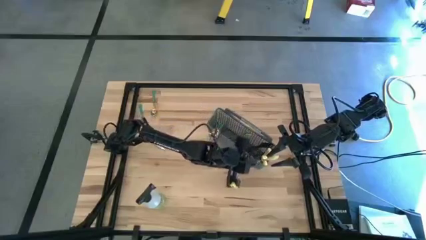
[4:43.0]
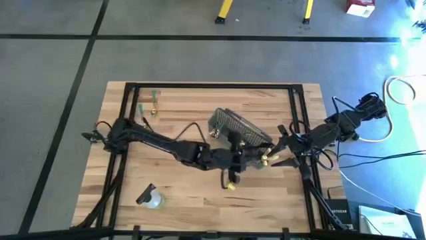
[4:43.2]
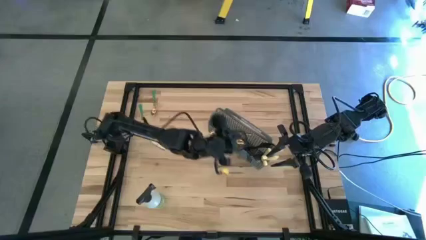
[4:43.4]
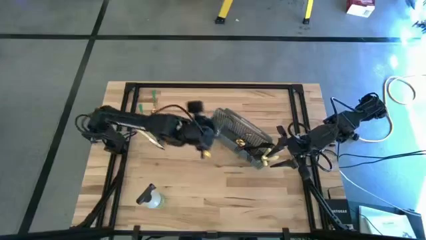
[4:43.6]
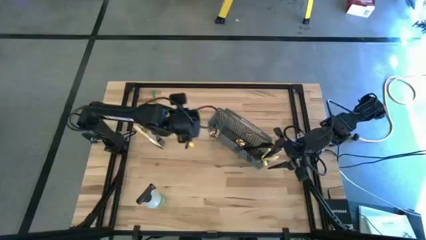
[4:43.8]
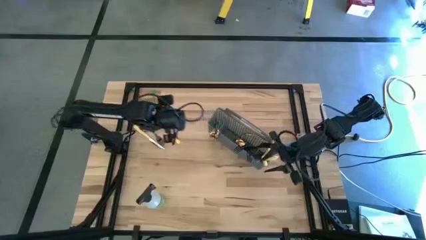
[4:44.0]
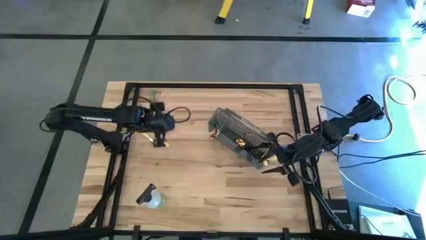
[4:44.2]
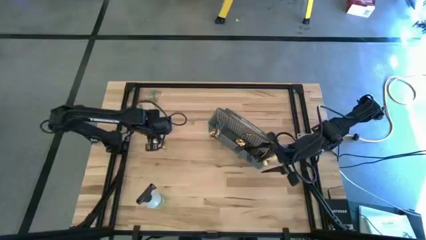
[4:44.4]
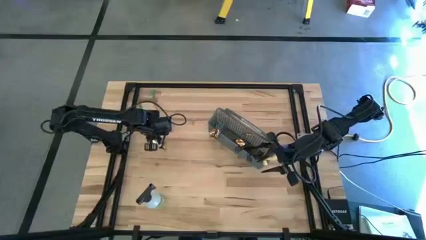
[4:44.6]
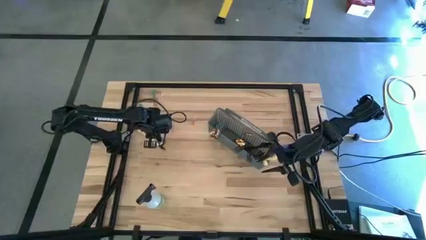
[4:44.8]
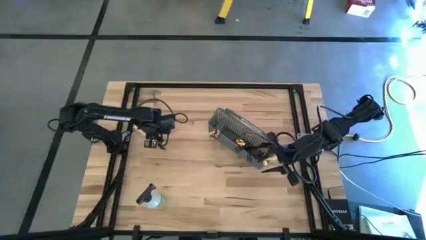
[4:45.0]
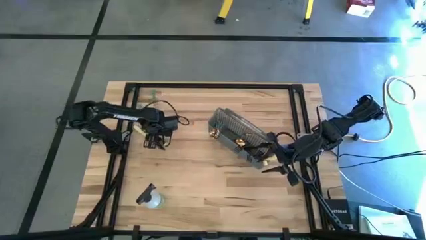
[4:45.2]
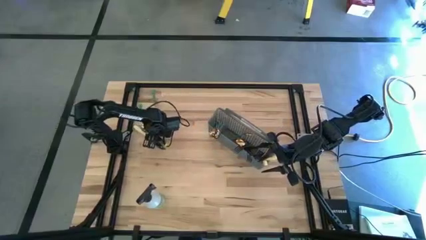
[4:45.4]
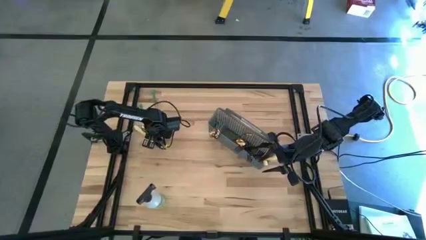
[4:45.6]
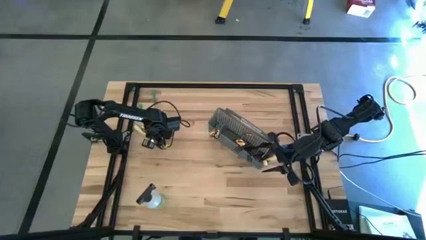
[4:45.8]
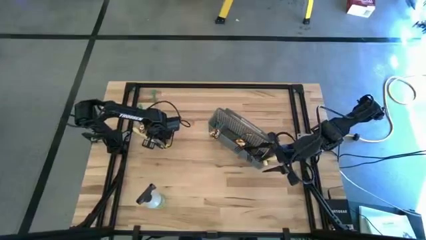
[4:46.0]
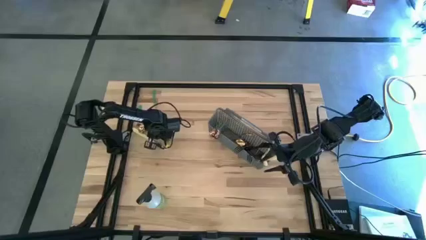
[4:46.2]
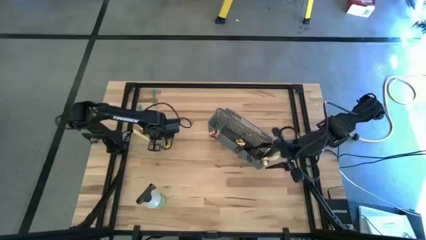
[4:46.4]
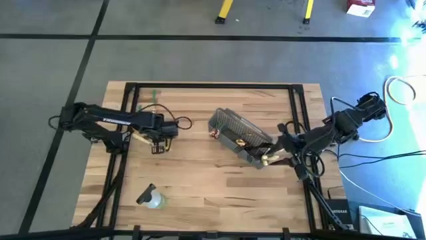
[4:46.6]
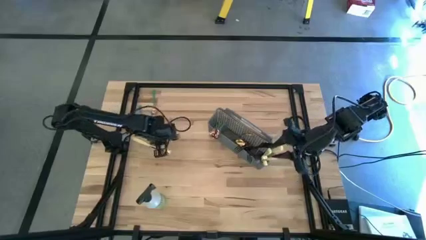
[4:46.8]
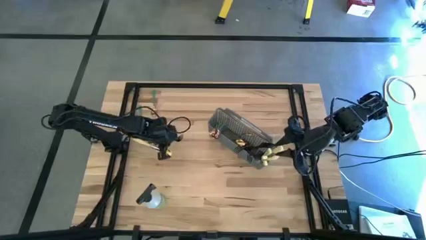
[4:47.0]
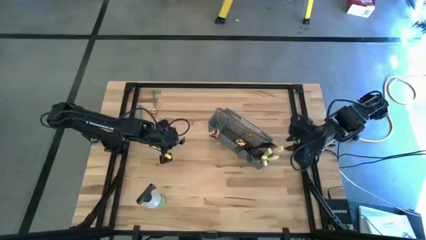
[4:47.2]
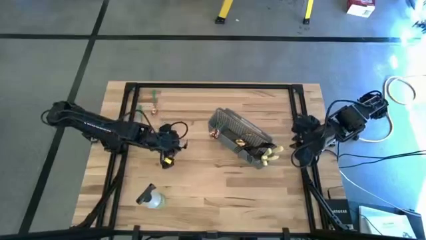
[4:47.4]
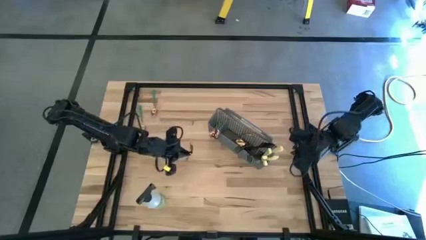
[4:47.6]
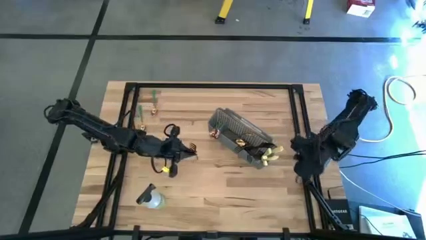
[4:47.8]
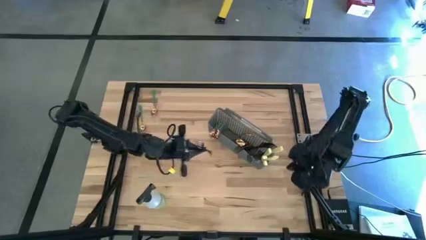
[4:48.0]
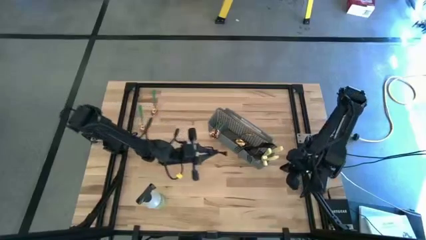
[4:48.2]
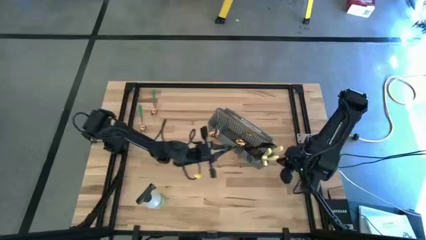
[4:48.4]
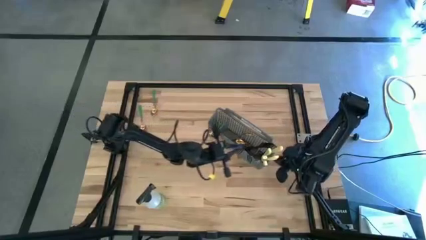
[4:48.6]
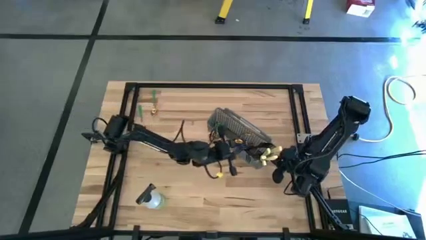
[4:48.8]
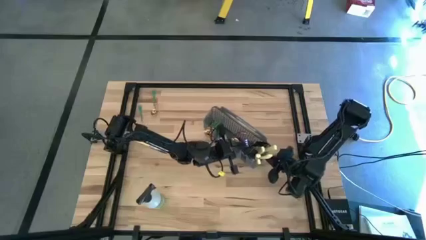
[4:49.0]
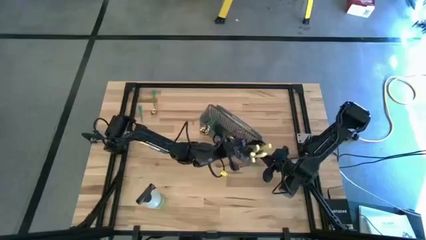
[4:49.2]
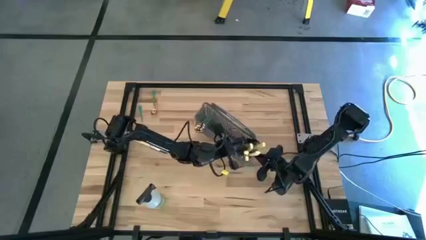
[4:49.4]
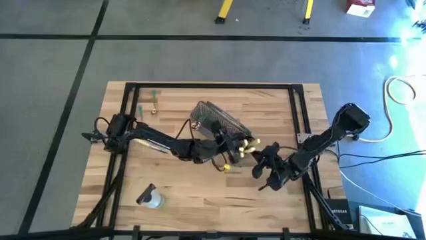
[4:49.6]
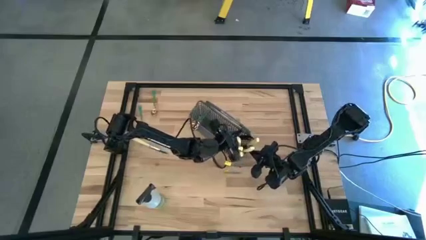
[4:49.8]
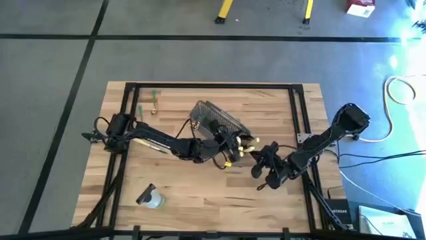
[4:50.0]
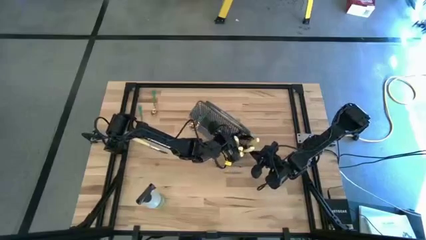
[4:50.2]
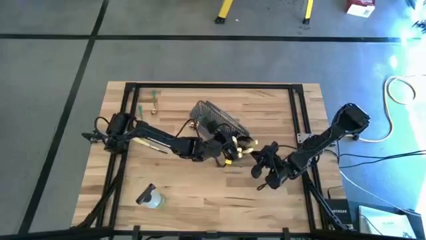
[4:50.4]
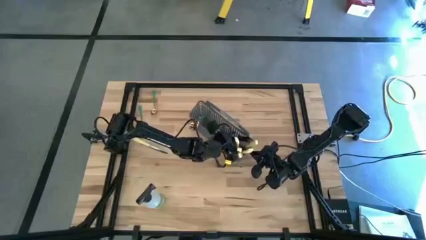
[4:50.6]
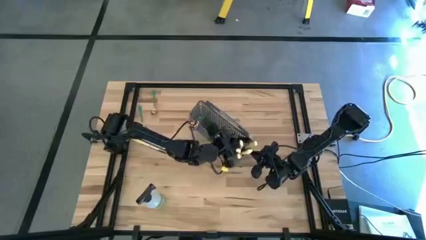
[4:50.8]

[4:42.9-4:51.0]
Task: Sort silverware
Put the black fork into the cutlery rack

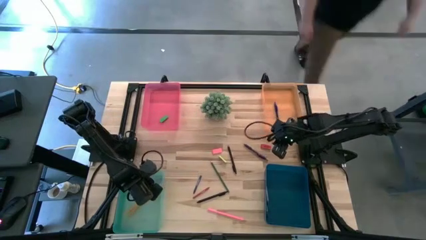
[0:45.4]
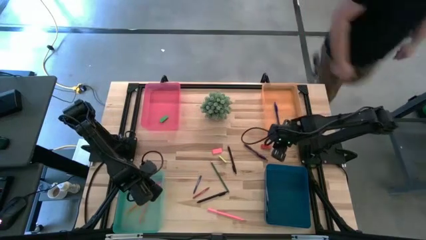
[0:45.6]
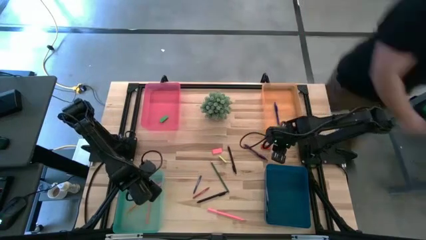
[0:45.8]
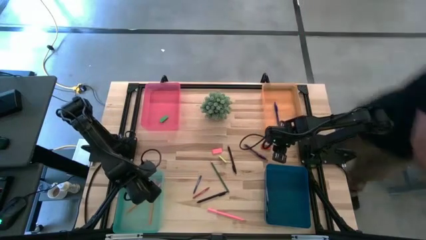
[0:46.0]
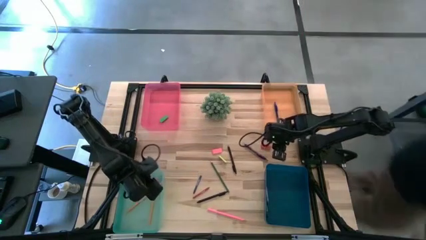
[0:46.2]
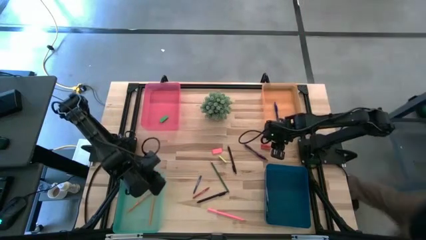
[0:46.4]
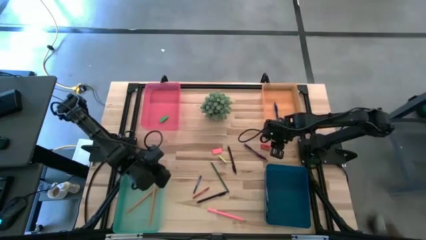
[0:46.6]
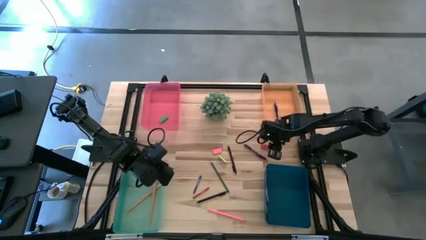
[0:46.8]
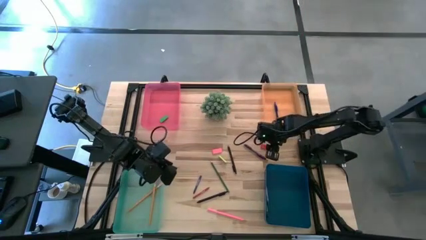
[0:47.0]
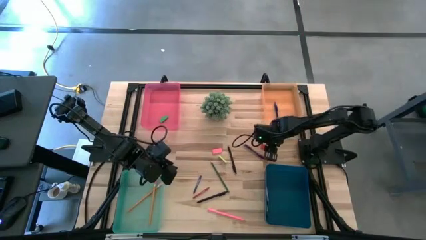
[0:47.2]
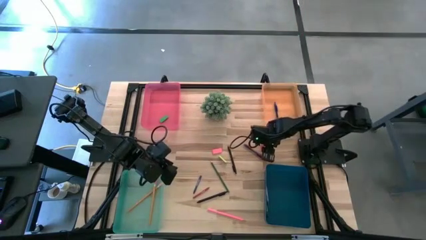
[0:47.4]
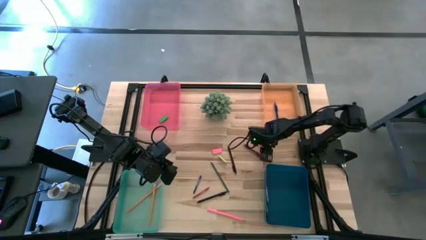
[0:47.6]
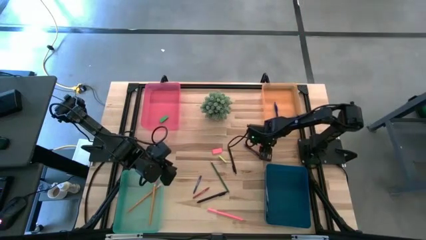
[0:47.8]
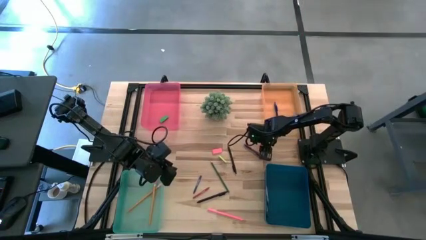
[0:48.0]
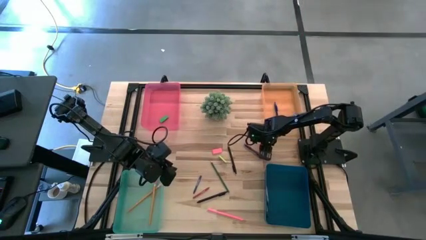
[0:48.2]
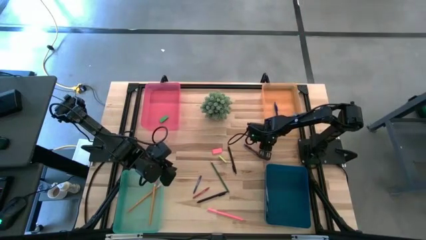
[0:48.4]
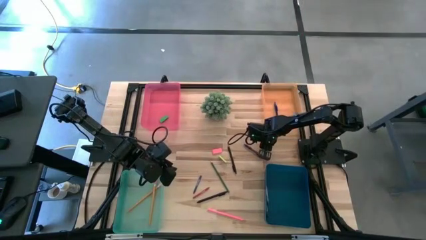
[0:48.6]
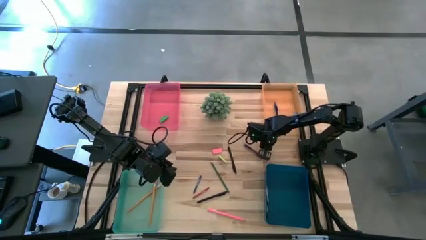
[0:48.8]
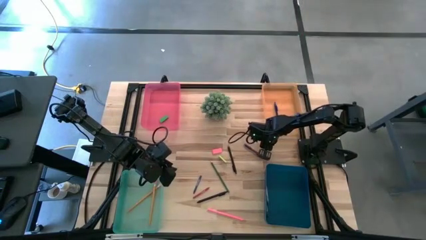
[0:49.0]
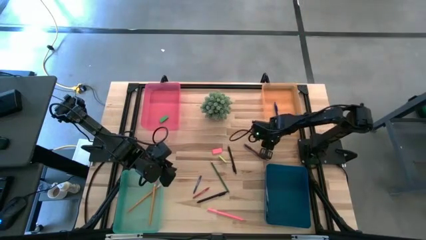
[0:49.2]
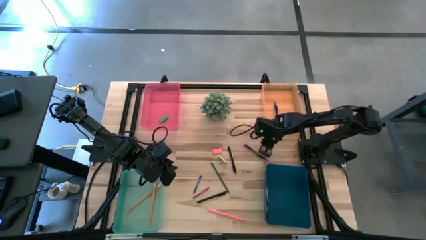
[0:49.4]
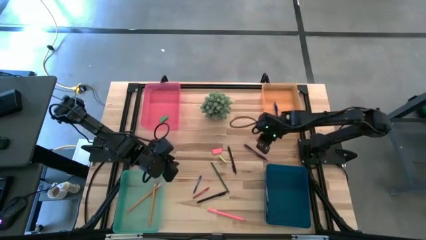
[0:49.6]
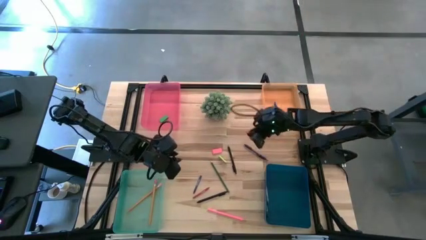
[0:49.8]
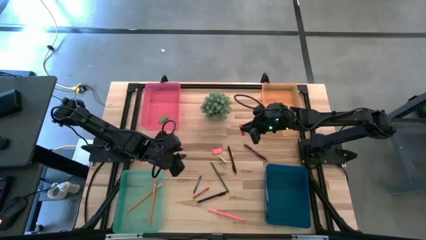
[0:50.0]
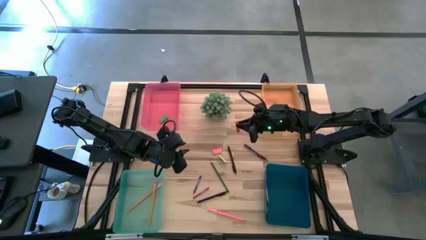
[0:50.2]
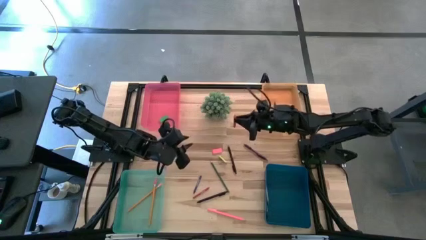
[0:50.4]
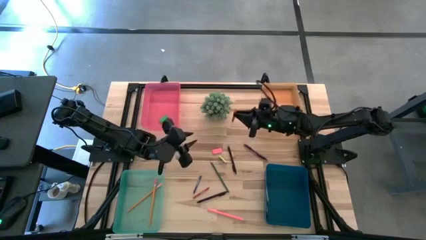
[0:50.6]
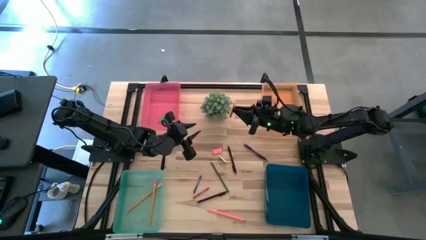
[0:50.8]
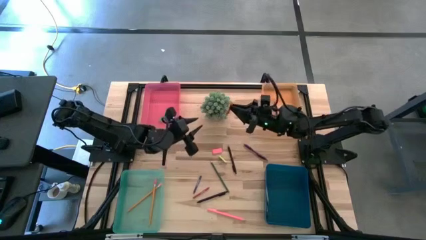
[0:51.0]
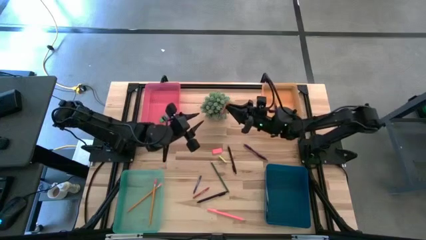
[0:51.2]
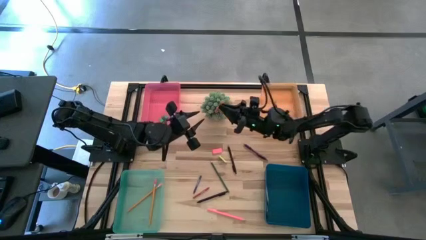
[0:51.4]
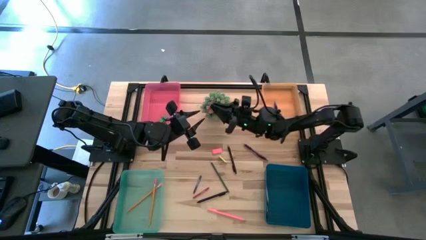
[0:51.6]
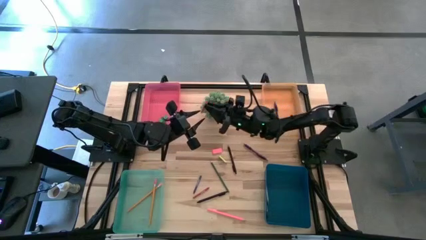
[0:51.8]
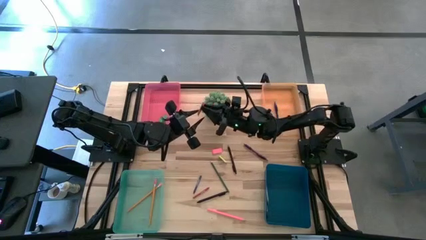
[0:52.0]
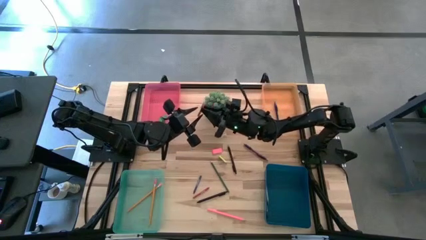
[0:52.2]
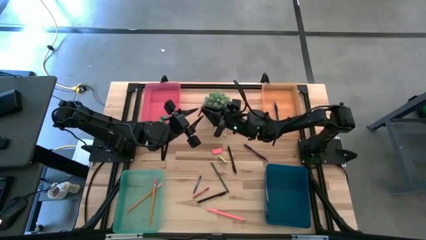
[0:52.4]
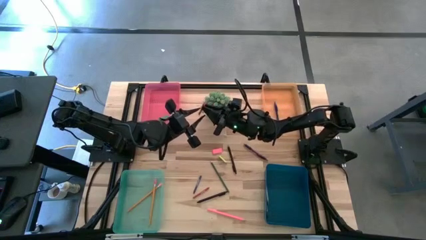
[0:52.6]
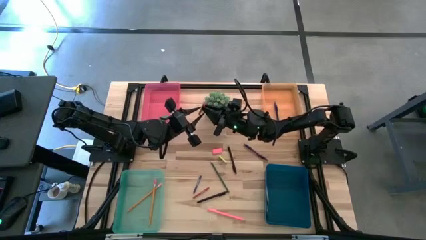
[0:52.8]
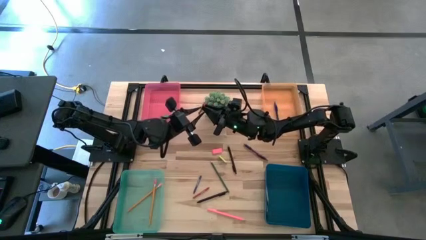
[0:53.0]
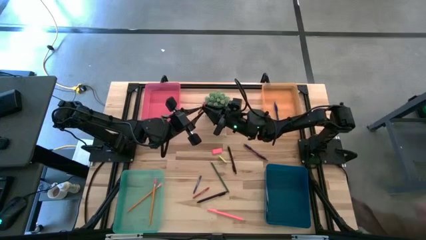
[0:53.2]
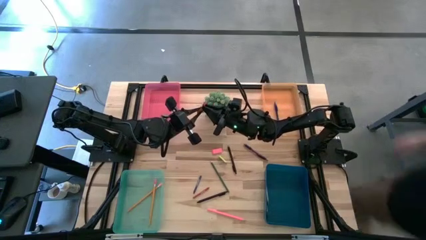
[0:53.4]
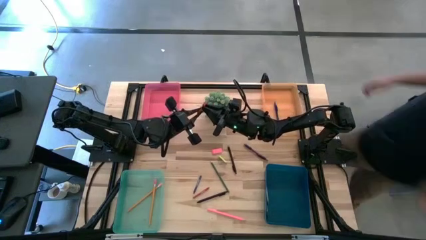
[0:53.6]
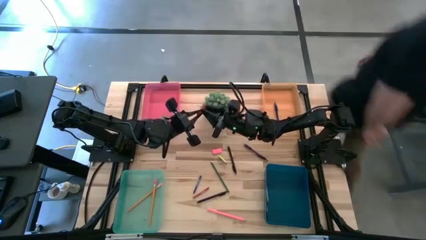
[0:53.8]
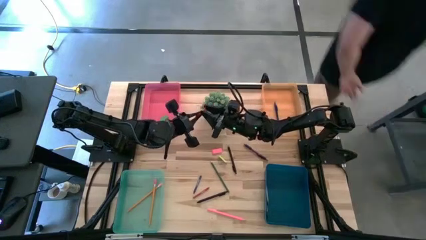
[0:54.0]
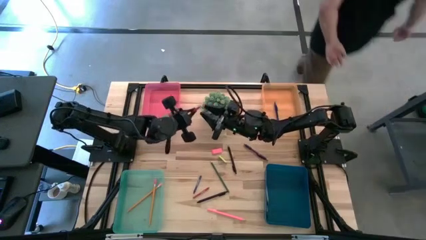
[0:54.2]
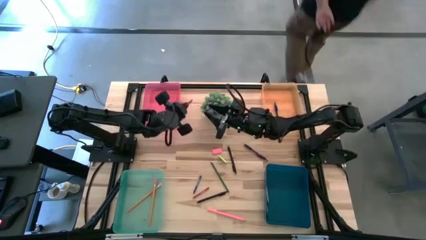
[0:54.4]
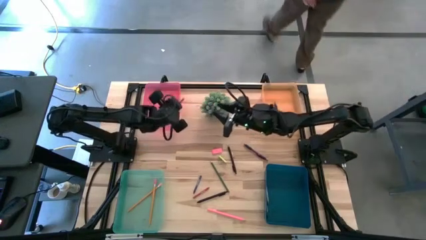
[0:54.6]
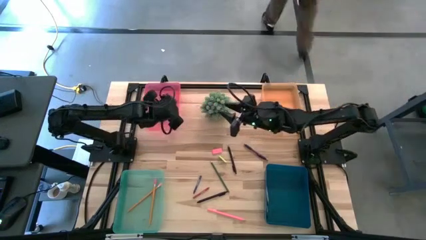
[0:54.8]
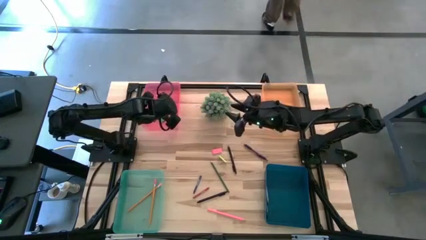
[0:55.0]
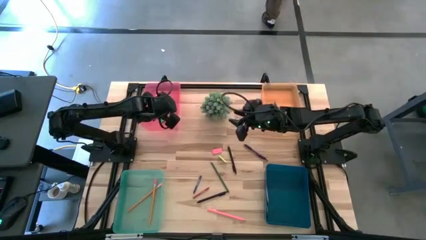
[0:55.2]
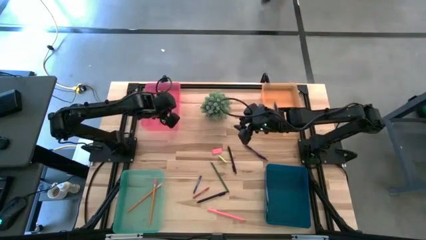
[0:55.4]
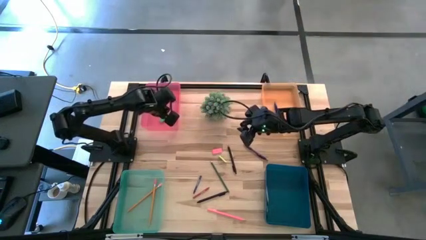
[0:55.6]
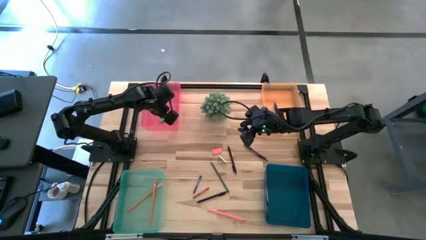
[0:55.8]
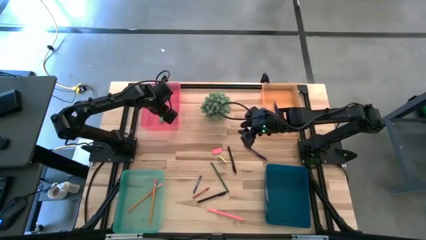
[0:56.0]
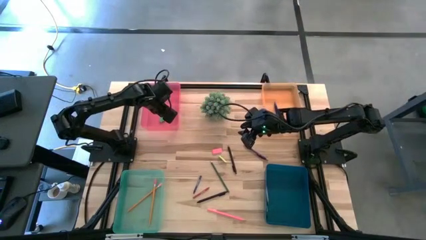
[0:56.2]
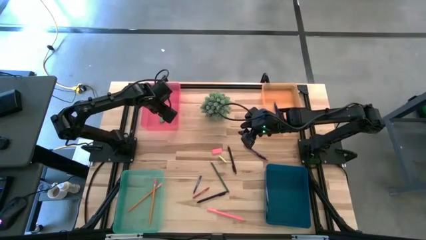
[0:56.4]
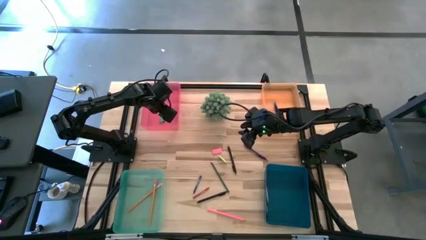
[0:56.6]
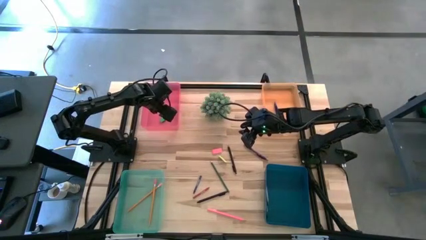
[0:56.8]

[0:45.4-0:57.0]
Task: Sort crayons/erasers/pens/pencils in bins
Put the red eraser into the red bin
